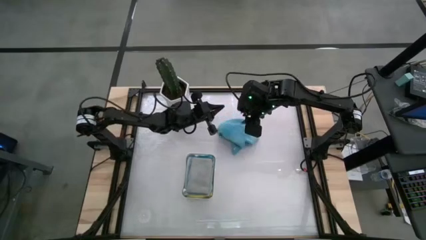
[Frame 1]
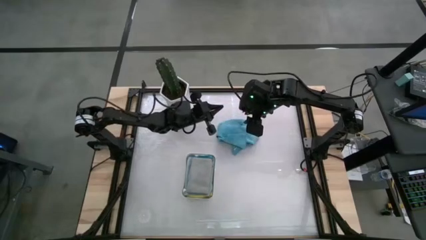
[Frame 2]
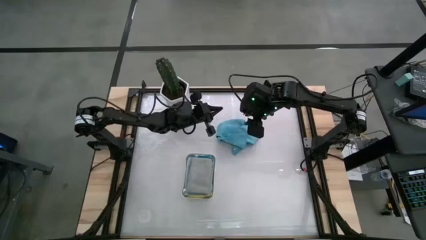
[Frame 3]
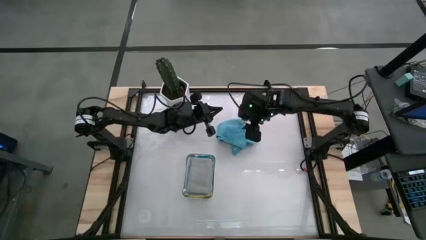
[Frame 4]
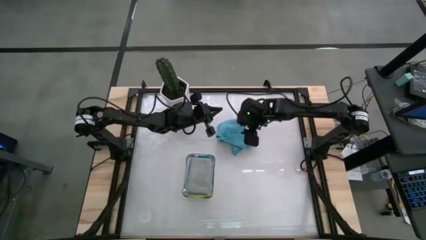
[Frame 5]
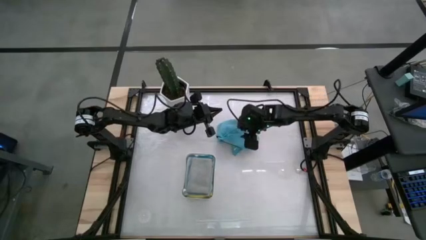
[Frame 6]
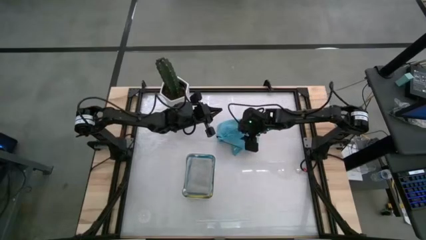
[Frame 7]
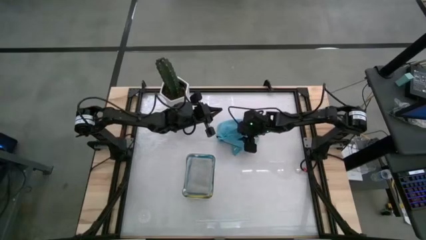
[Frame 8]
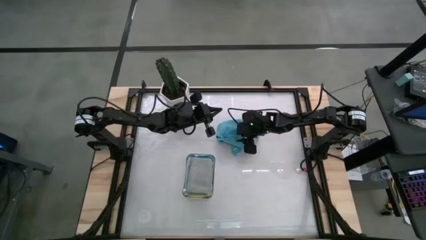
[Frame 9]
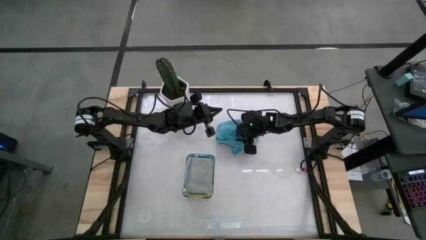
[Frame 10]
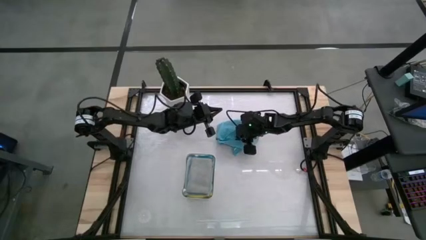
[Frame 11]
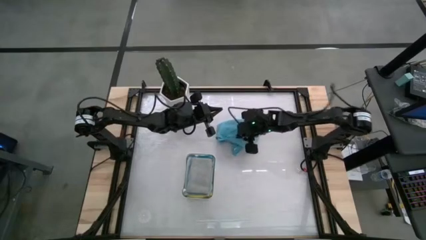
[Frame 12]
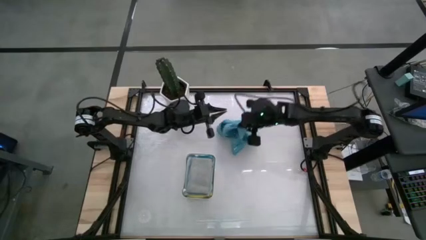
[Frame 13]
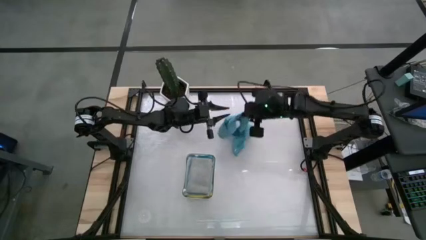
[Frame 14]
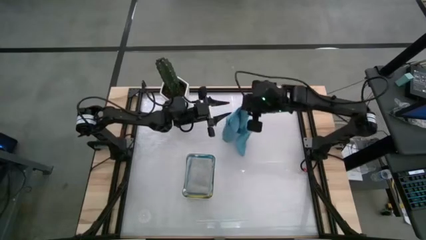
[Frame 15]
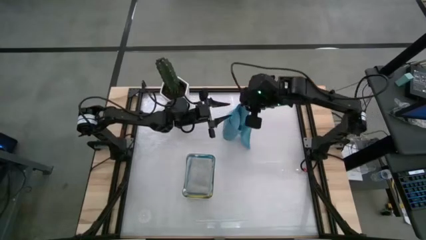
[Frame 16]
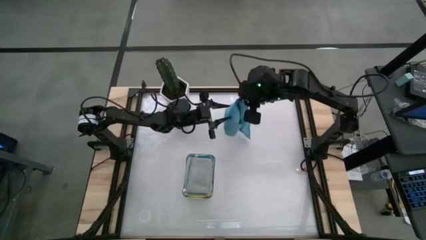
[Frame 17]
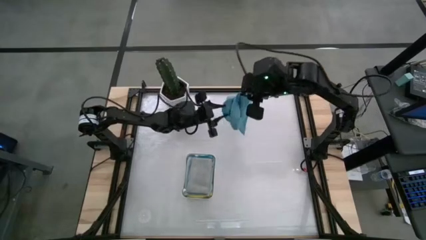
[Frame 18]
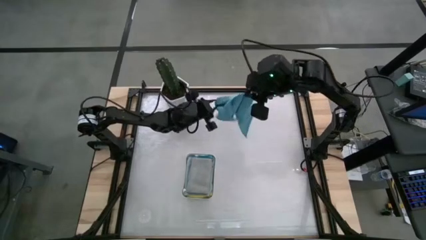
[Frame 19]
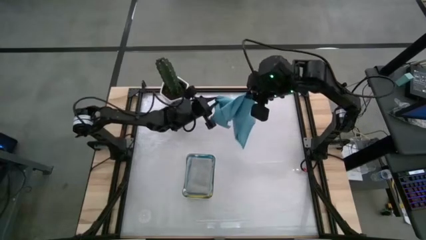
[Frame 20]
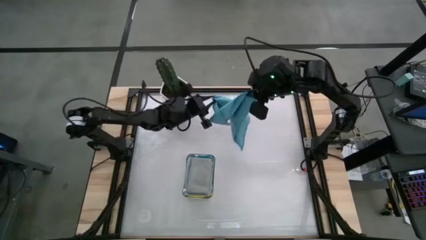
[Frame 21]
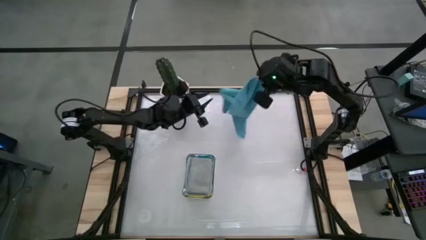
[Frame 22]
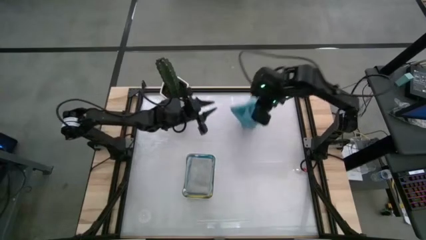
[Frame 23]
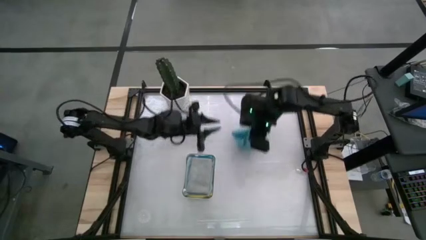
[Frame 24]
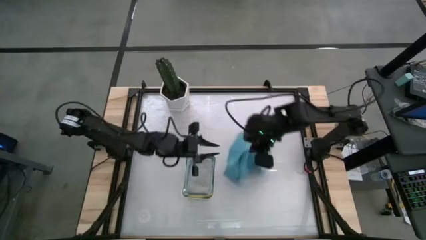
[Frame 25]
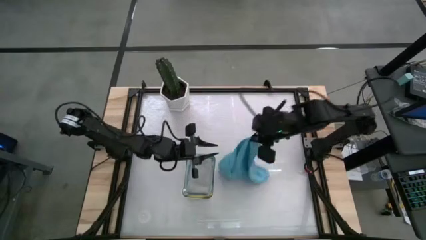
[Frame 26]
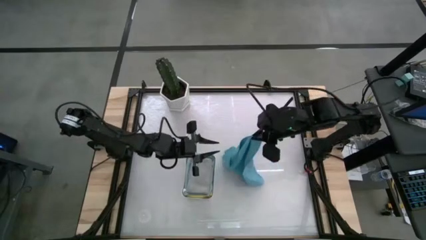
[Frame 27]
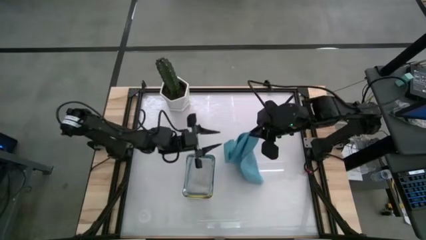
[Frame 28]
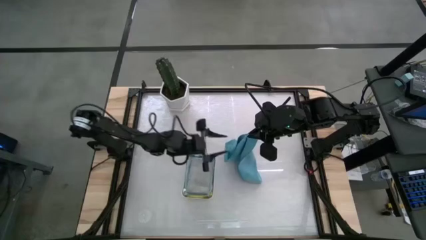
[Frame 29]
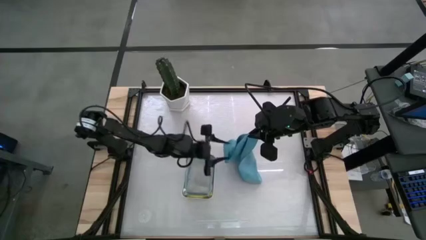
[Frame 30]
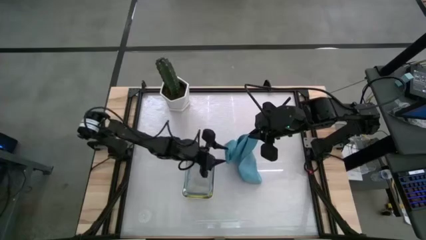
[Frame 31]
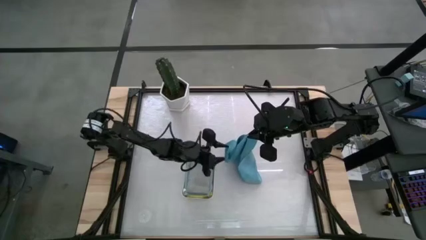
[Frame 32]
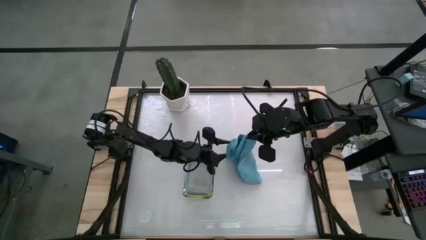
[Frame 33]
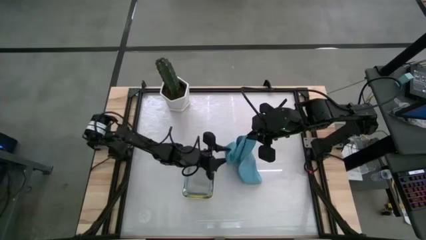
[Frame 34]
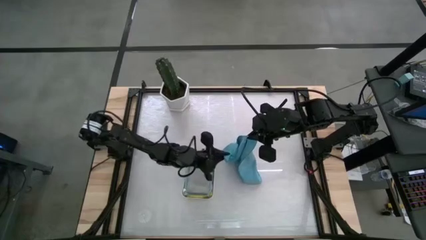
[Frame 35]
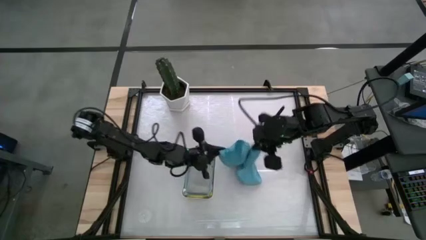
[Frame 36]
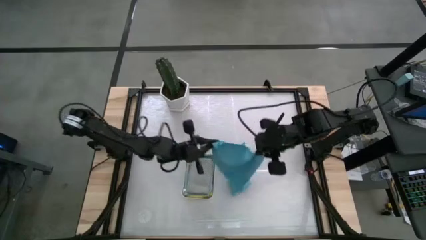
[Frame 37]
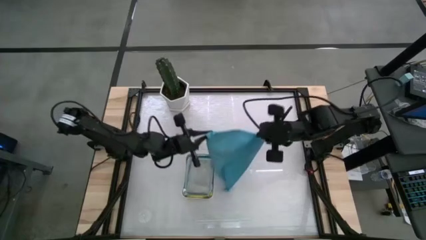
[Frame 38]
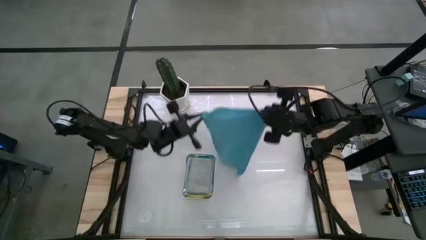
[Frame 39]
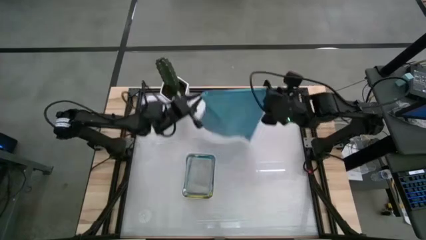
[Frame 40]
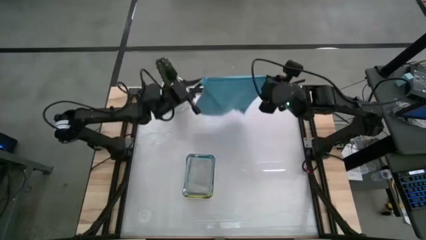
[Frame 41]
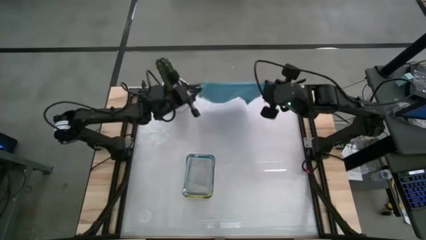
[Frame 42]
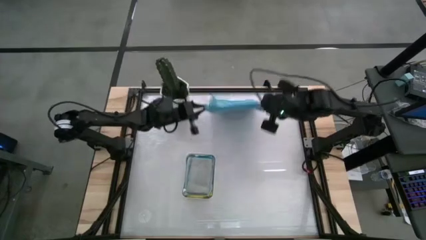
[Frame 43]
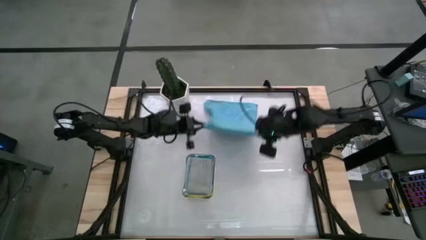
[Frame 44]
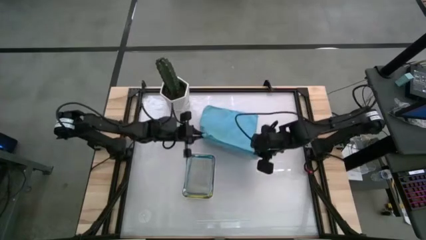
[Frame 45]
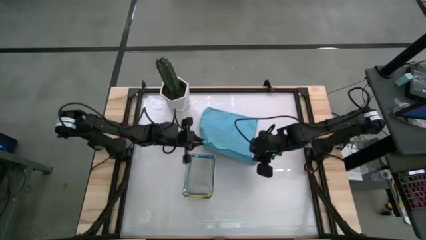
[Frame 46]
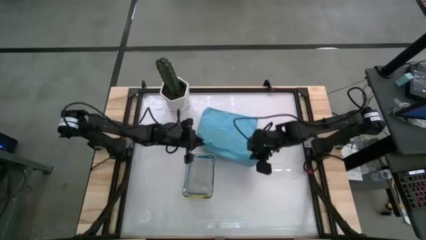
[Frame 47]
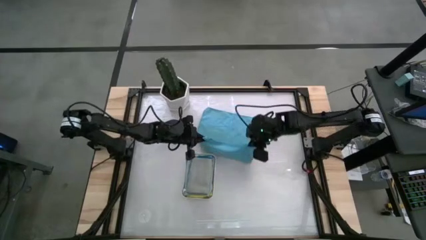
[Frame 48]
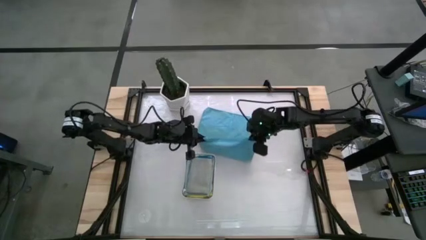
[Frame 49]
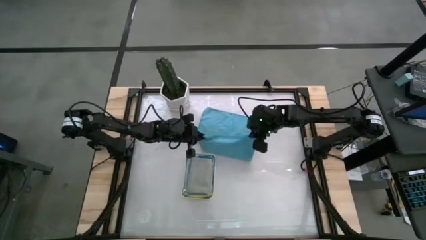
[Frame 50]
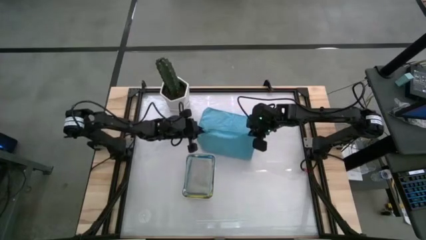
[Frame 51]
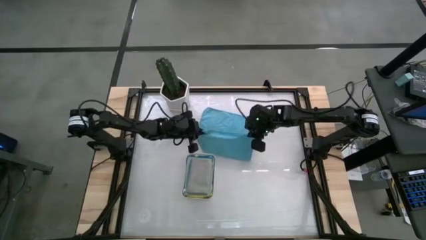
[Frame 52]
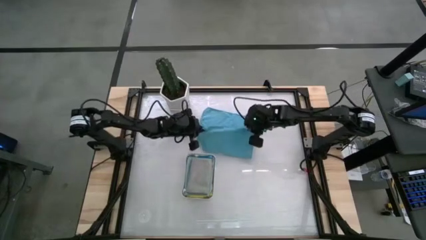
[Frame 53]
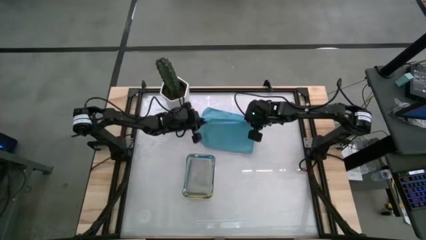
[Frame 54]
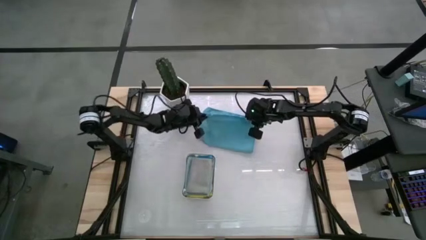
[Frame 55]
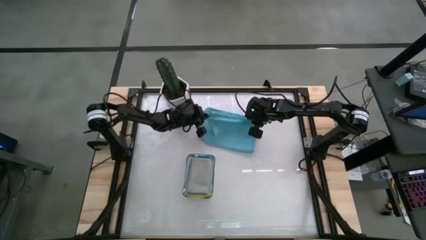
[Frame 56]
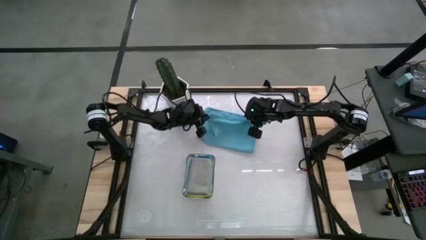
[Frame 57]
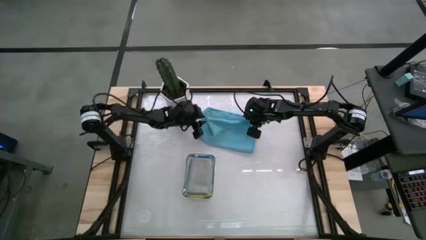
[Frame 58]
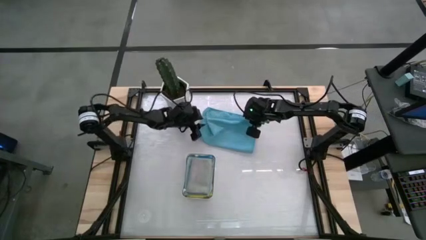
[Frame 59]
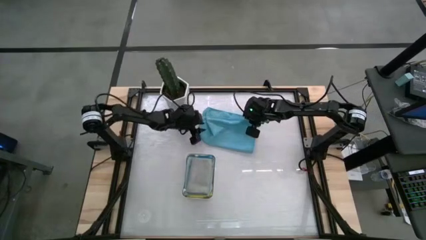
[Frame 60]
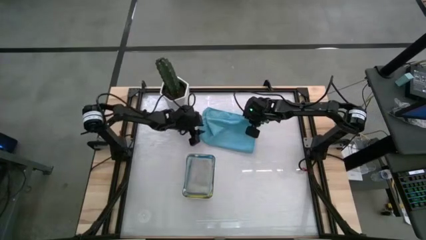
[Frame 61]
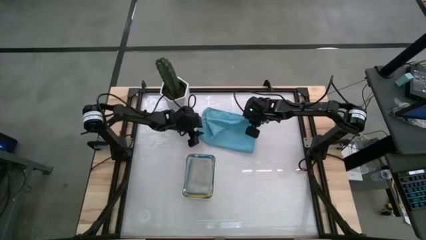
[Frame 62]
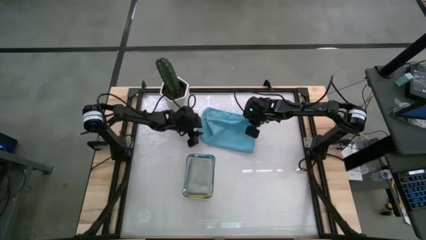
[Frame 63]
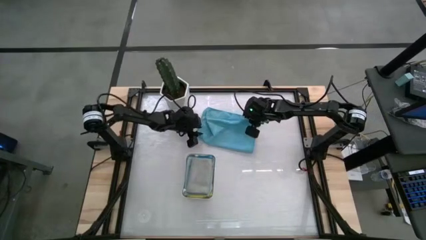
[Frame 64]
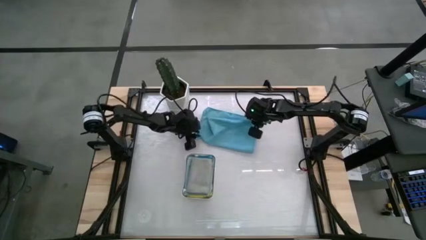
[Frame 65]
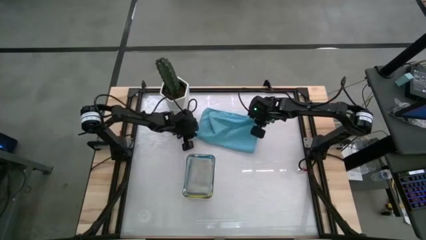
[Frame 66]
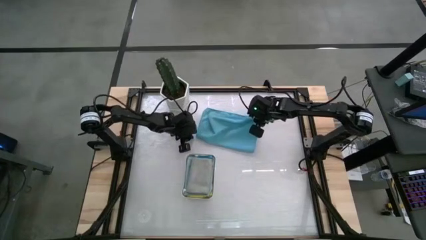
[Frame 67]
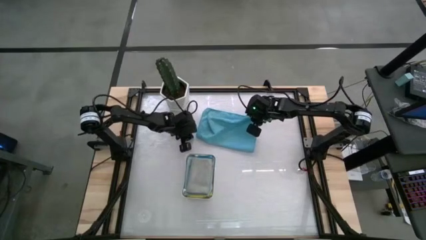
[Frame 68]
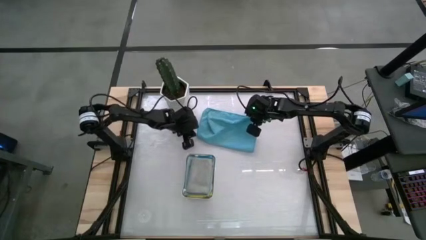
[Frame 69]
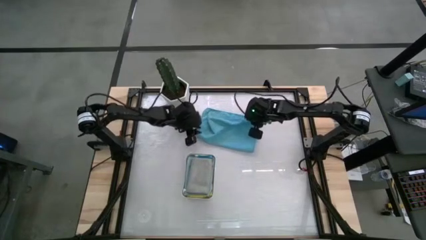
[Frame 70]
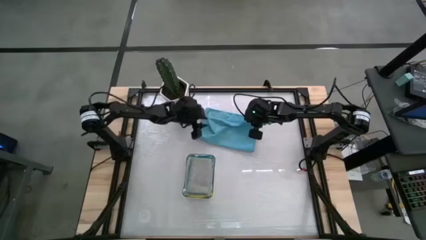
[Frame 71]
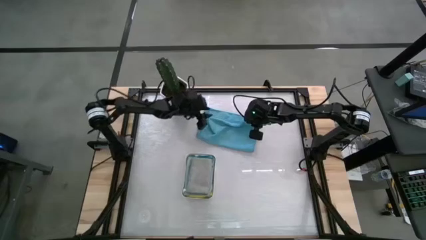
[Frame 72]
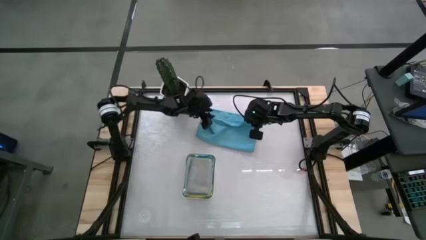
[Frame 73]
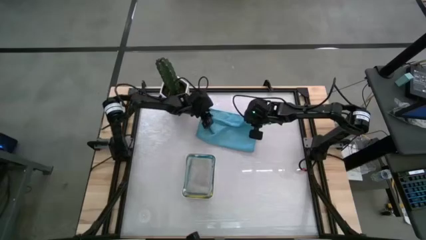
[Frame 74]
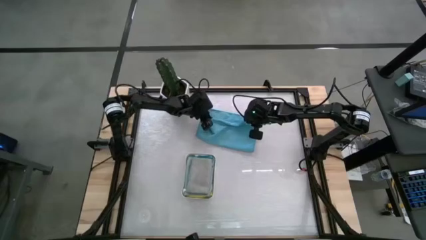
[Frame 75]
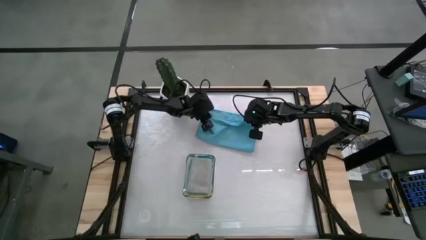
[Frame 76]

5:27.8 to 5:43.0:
Task: Fold microfiber towels
Fold the blue microfiber towel
